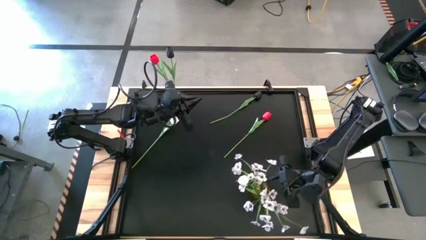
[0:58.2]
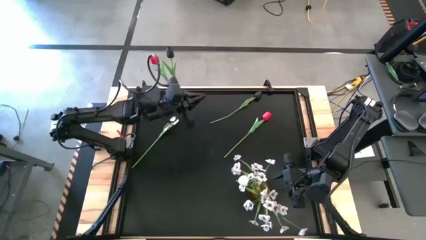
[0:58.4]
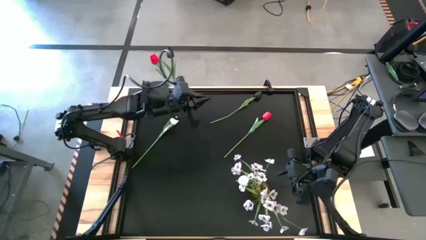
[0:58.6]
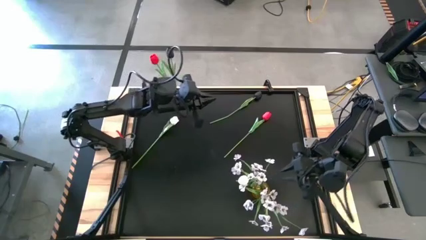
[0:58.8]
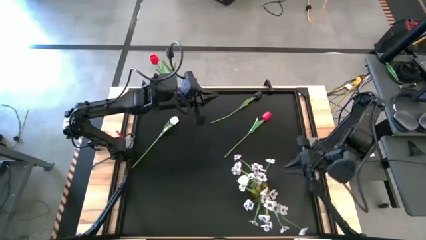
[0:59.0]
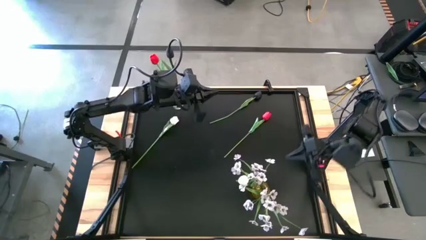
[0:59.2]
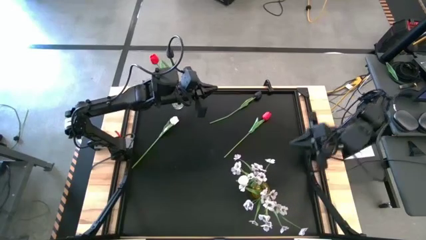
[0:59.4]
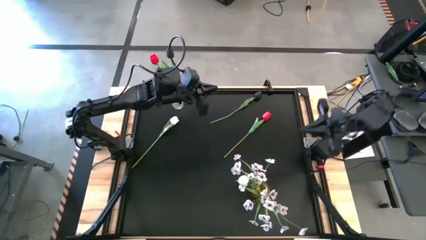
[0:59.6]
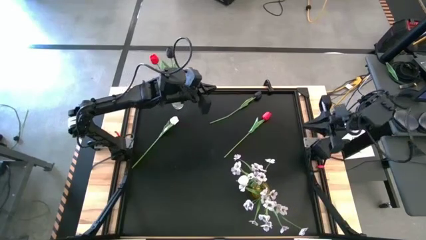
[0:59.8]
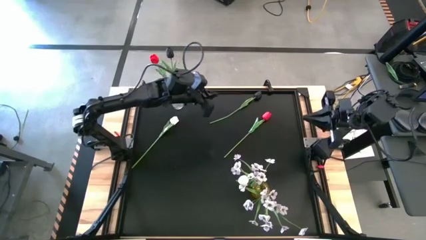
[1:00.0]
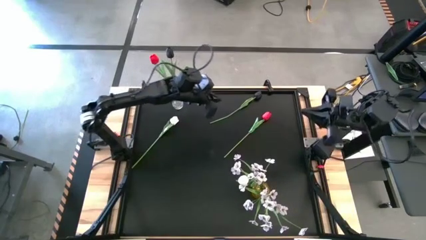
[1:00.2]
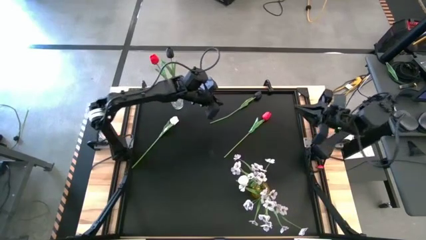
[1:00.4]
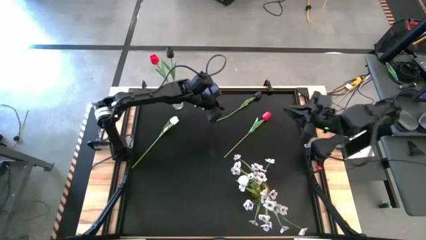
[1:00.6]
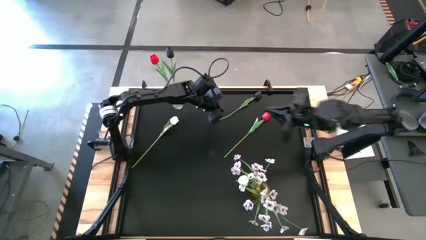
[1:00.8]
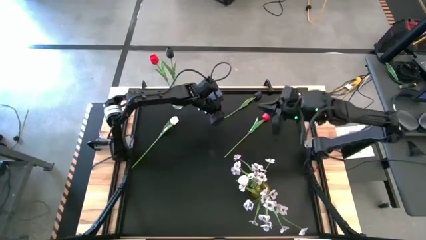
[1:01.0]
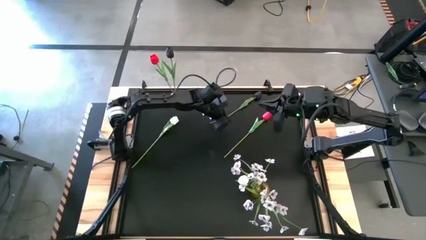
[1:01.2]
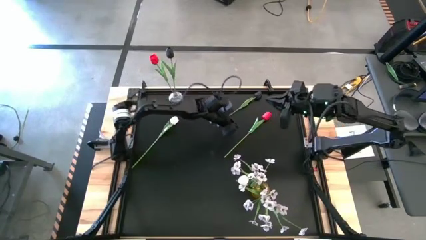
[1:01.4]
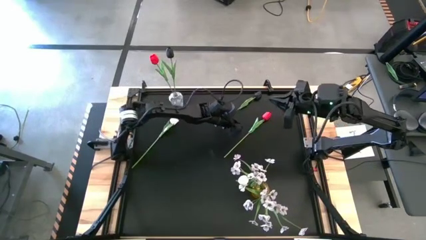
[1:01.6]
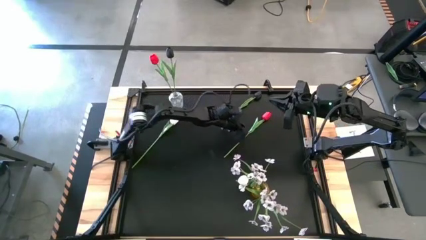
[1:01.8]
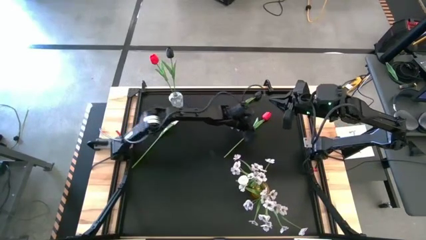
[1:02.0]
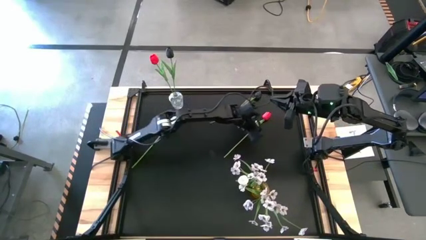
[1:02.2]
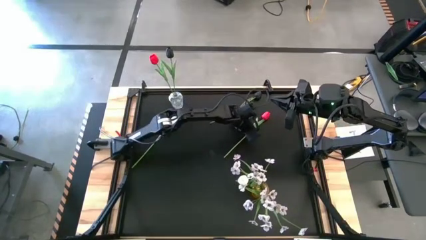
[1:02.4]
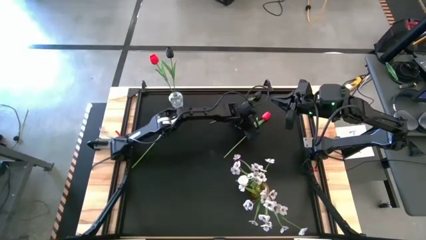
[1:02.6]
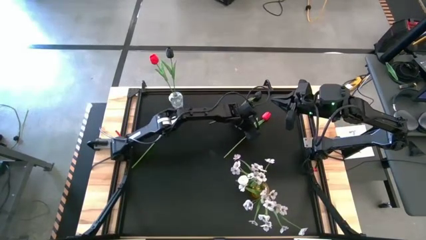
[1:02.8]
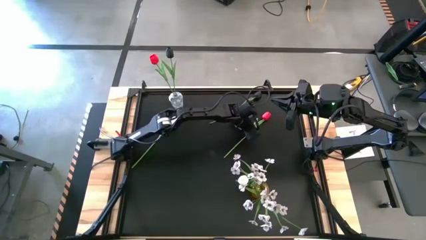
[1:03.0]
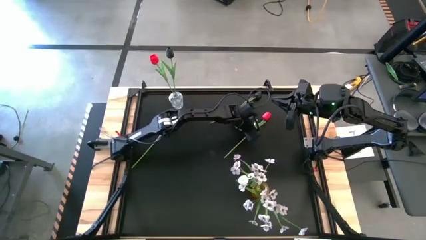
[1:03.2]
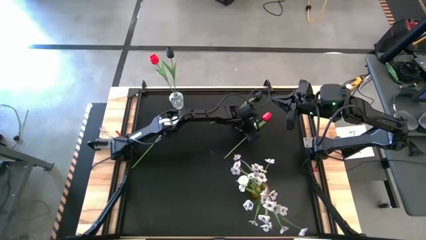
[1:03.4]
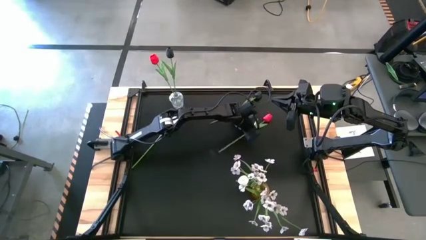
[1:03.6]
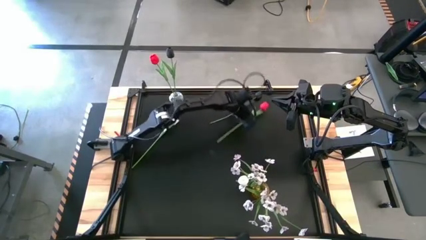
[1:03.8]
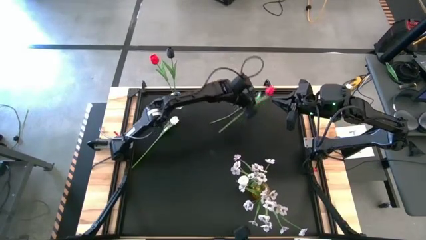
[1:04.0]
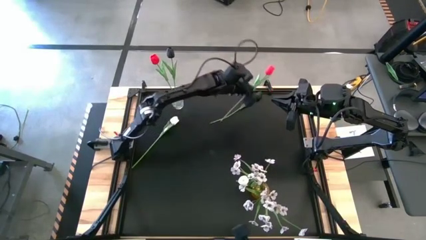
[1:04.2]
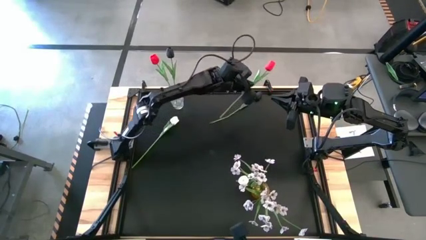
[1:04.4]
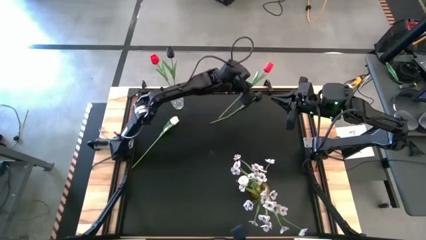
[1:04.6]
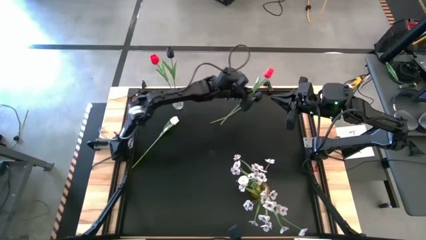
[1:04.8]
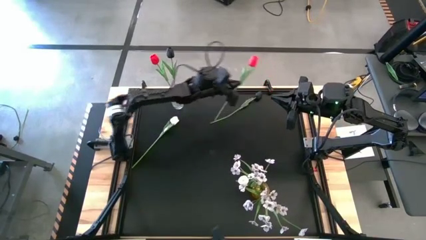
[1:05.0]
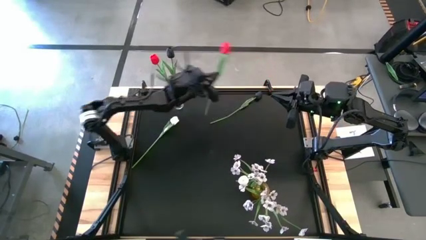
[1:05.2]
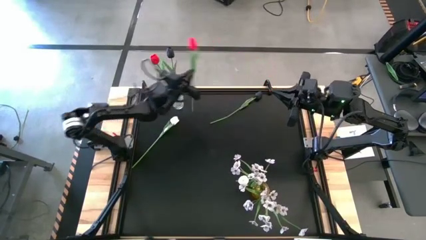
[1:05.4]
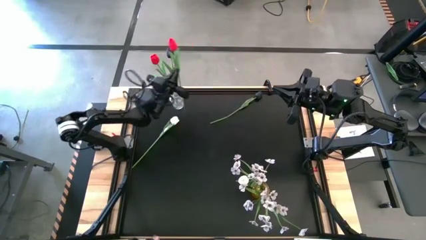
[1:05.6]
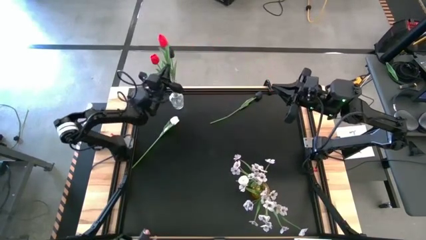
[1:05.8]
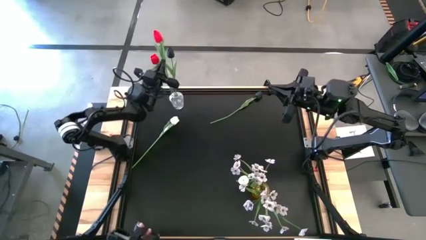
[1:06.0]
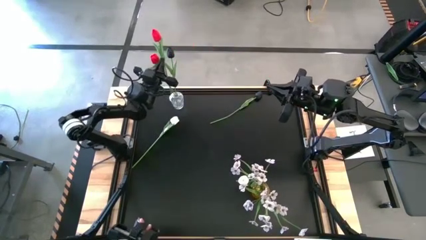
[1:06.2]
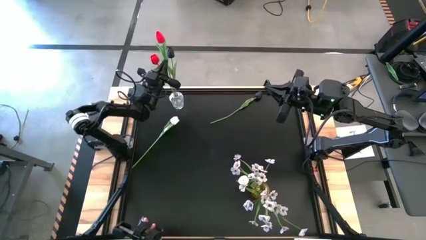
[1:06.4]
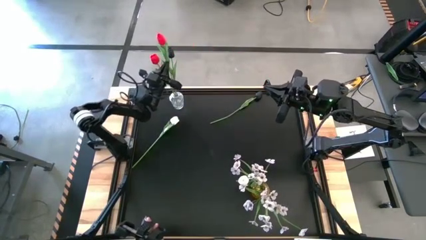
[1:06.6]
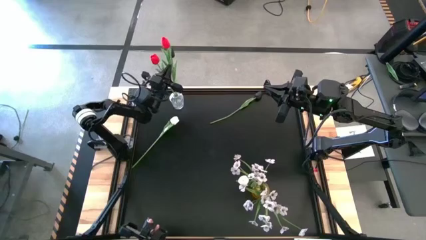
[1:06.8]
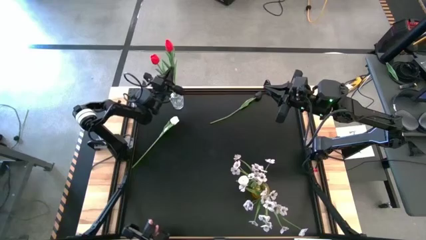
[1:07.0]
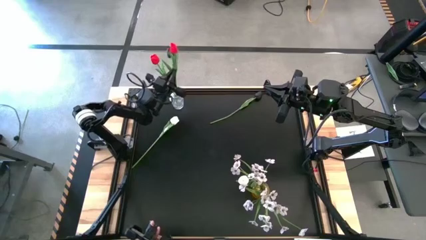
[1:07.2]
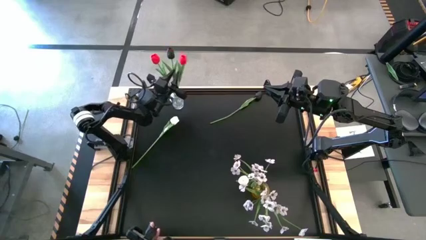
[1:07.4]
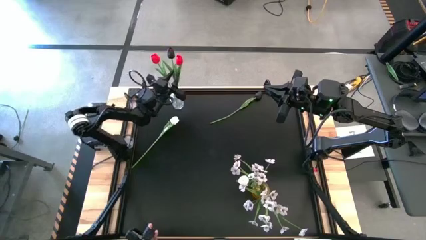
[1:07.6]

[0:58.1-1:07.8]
Task: Sort flowers into vase by color
Put the red flower into the transparent vase

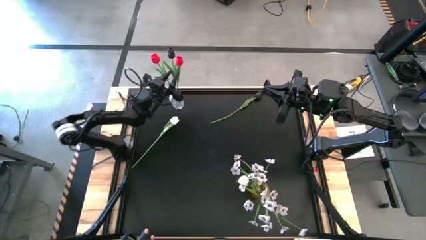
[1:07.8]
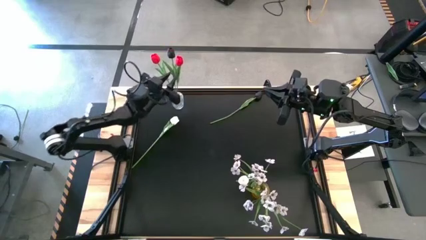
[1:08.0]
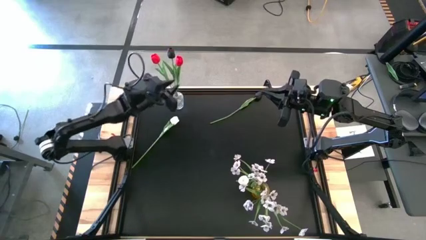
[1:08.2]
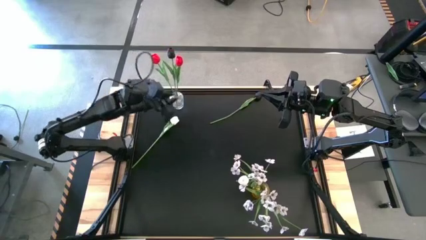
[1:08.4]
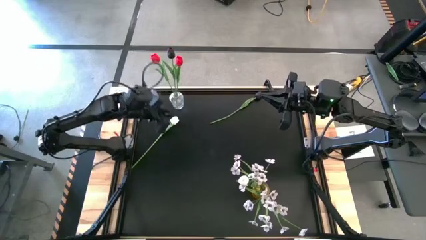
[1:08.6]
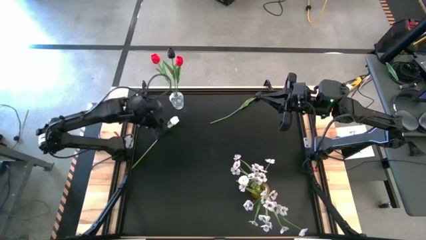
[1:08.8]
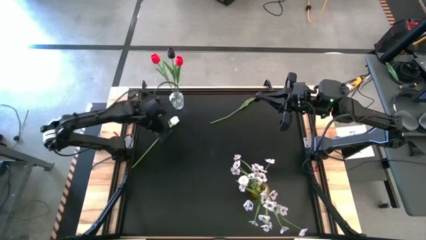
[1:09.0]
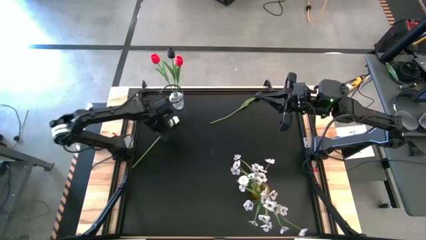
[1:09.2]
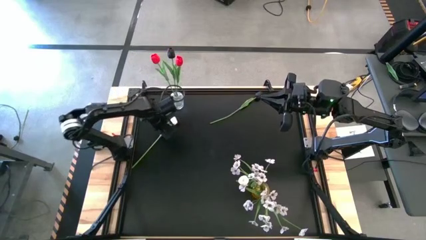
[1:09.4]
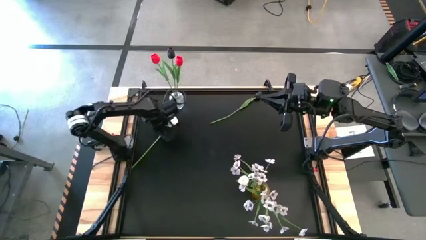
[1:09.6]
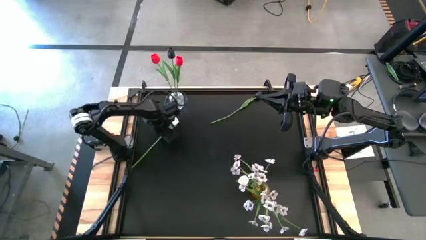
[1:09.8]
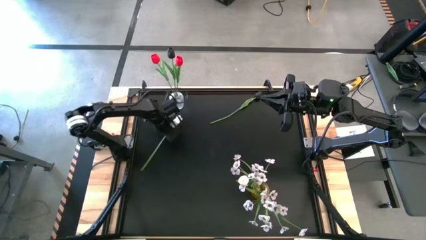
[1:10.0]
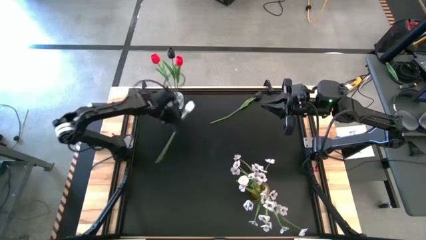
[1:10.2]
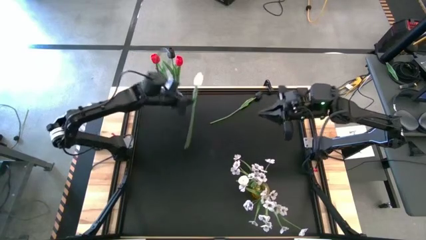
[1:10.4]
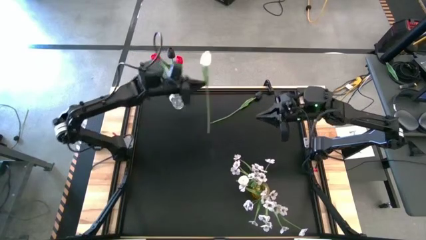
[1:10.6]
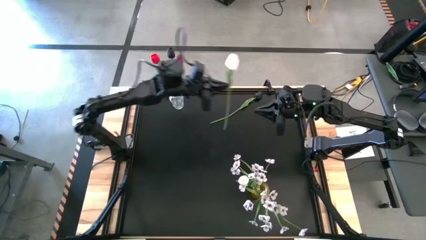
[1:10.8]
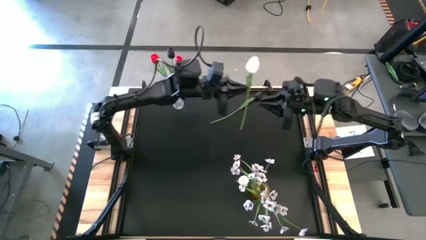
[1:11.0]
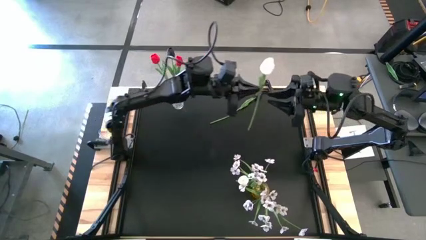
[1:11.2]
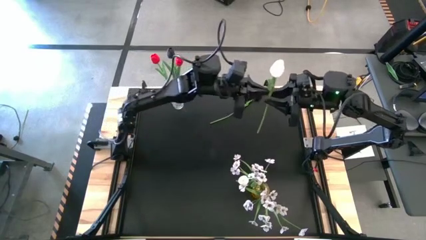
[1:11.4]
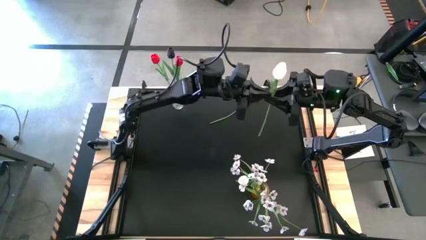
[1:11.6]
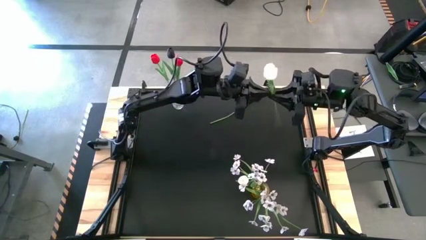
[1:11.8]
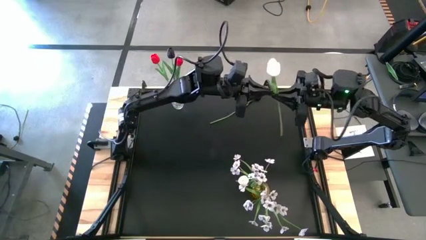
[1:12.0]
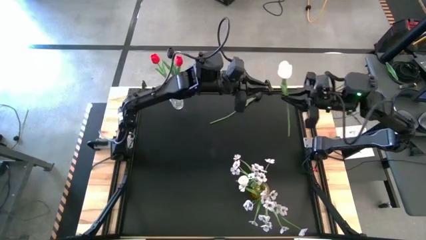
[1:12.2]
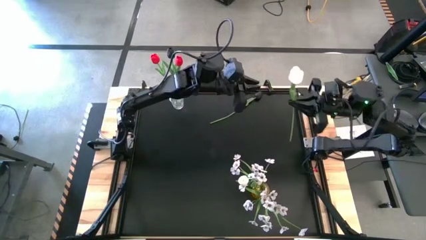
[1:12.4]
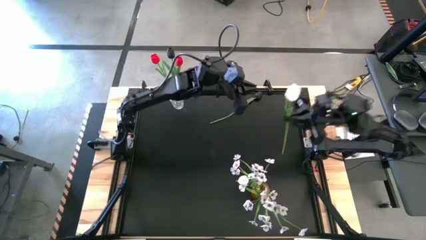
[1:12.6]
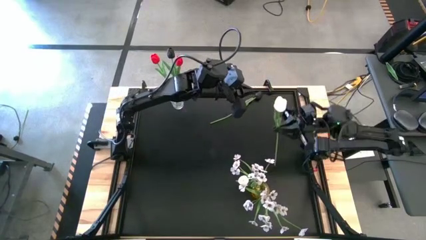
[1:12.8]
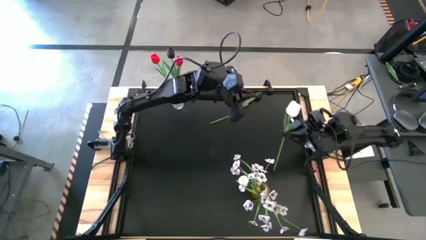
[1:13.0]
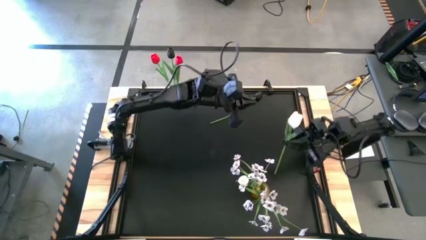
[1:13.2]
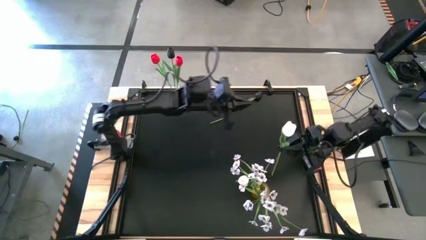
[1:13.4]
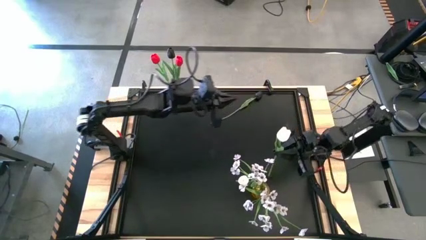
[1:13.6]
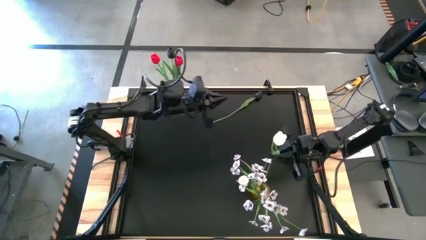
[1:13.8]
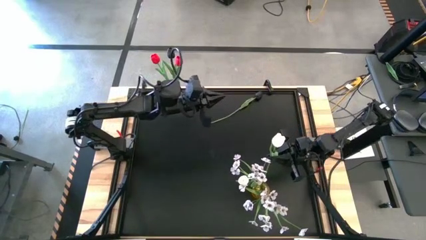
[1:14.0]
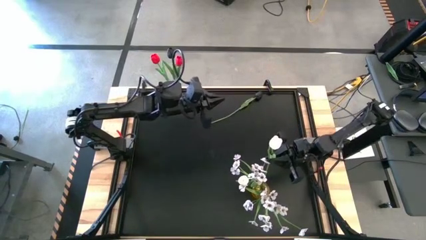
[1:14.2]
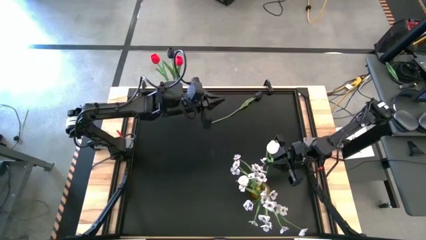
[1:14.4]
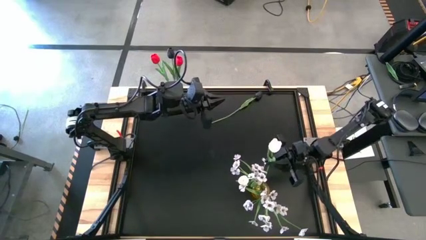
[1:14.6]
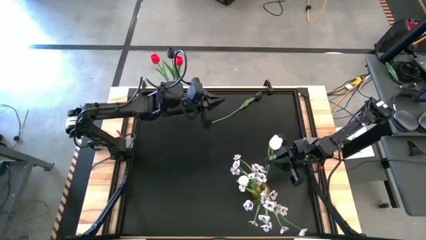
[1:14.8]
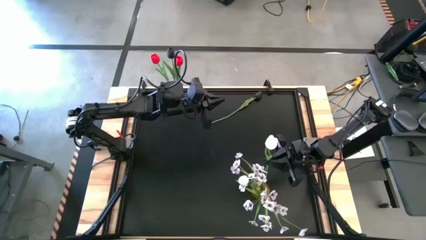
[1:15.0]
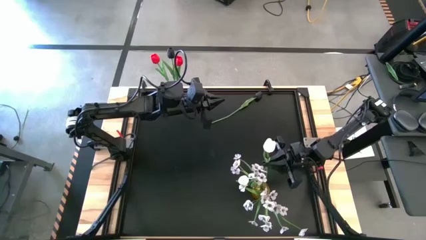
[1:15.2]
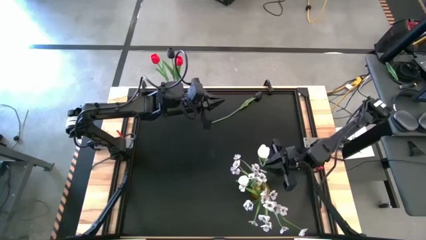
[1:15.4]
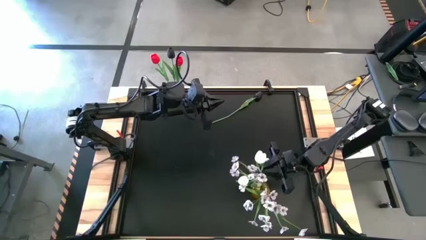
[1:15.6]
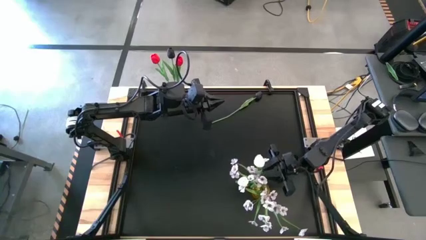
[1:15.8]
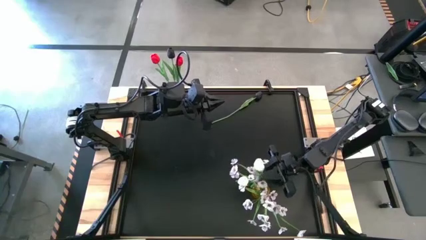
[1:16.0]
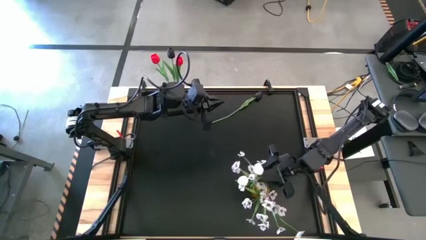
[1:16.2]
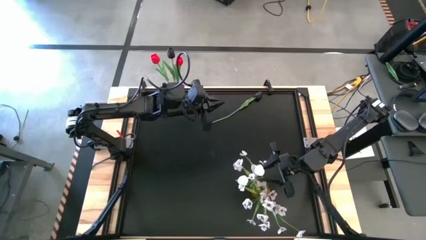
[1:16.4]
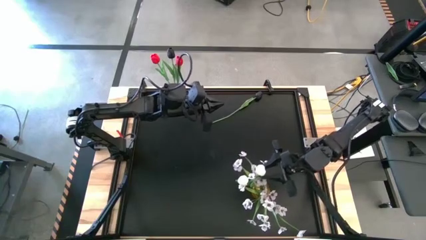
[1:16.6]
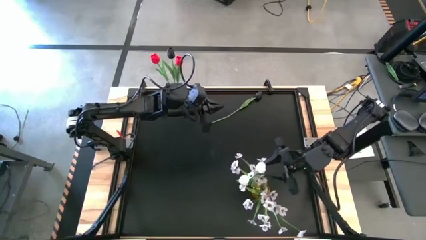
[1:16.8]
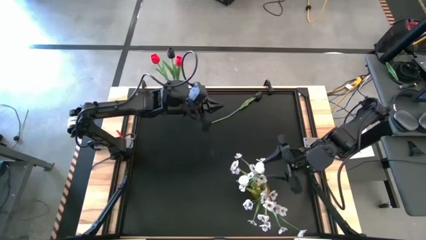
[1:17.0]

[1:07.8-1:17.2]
Put the white flower into the yellow vase
